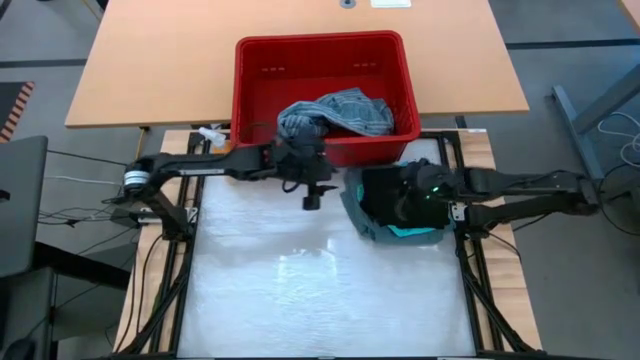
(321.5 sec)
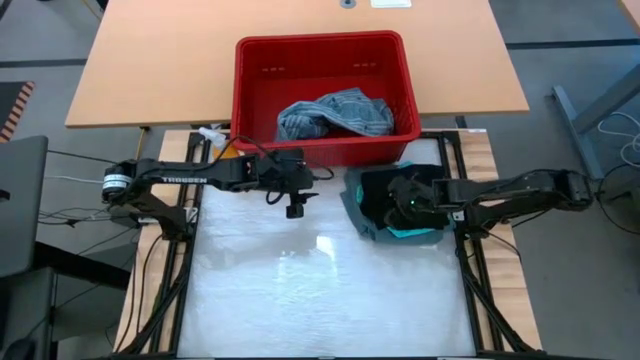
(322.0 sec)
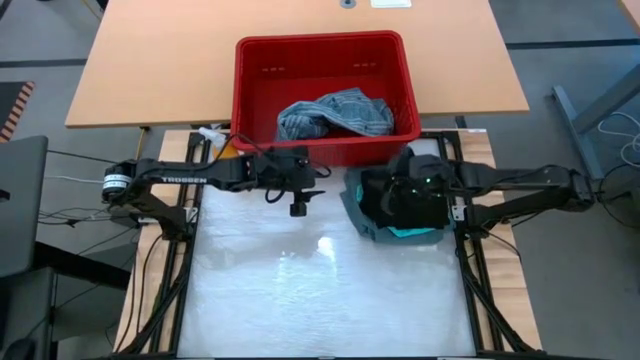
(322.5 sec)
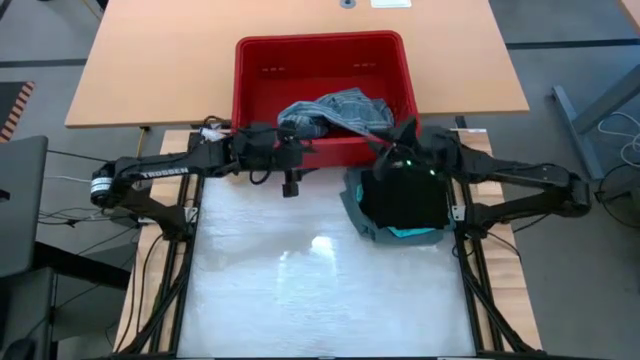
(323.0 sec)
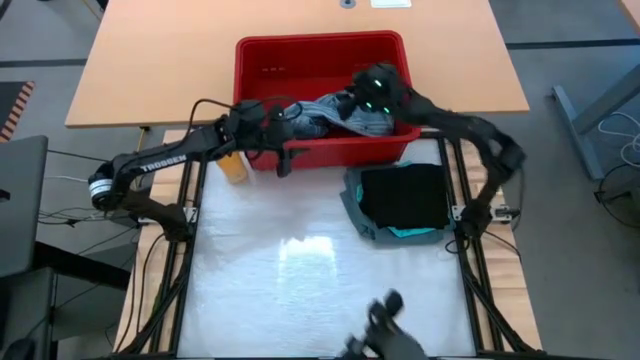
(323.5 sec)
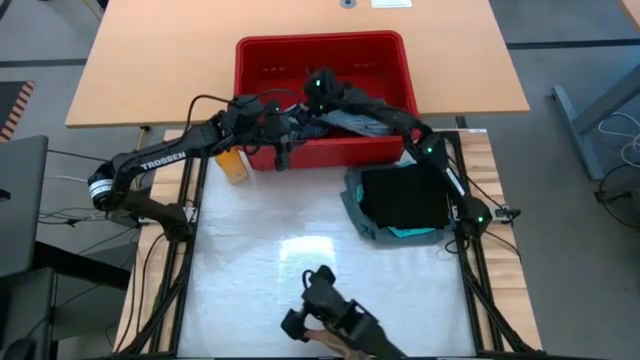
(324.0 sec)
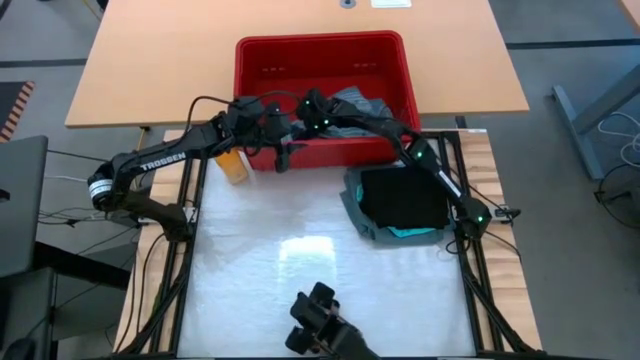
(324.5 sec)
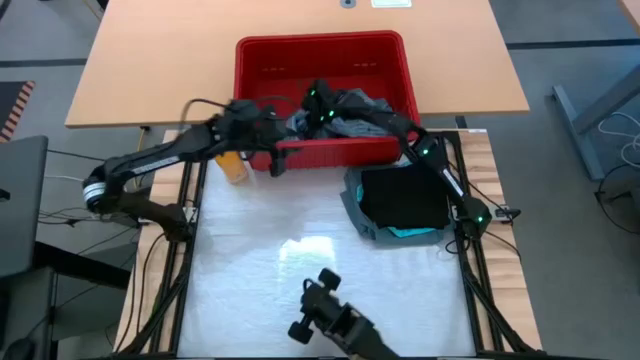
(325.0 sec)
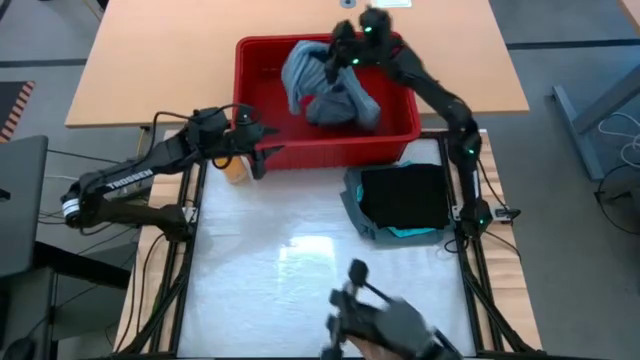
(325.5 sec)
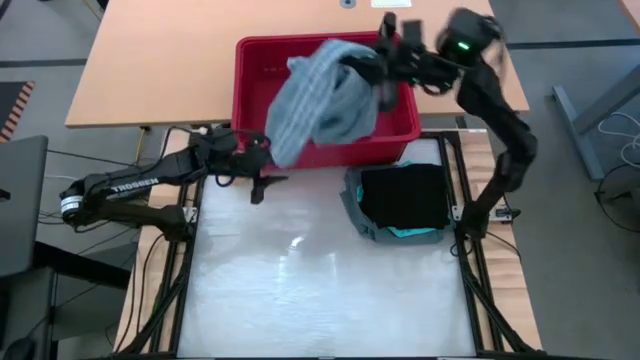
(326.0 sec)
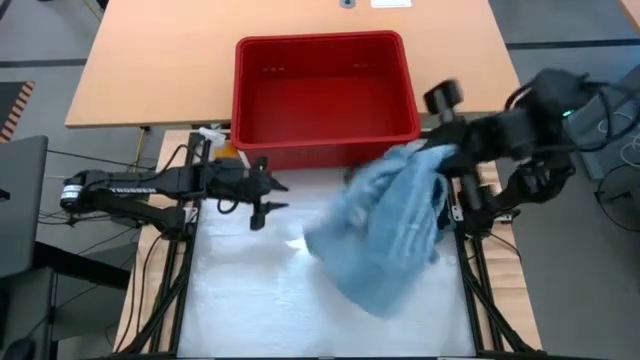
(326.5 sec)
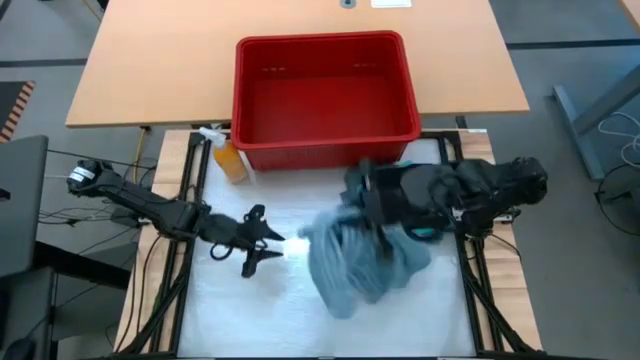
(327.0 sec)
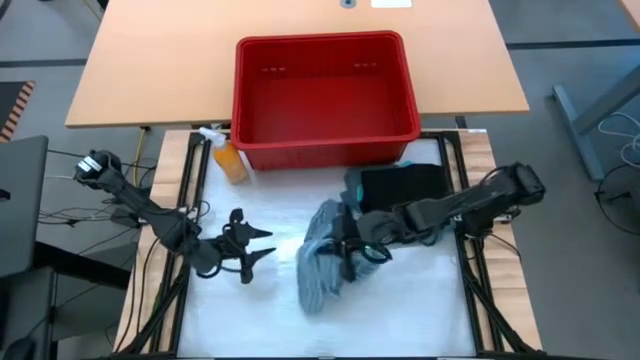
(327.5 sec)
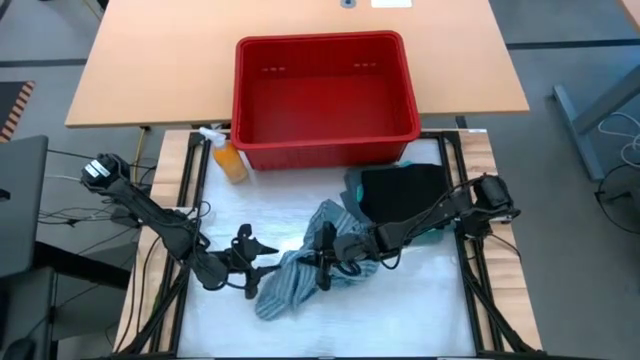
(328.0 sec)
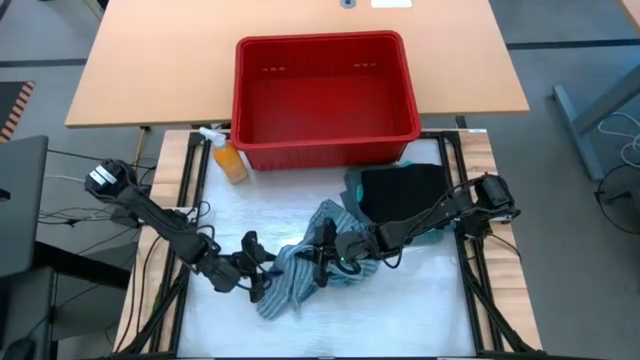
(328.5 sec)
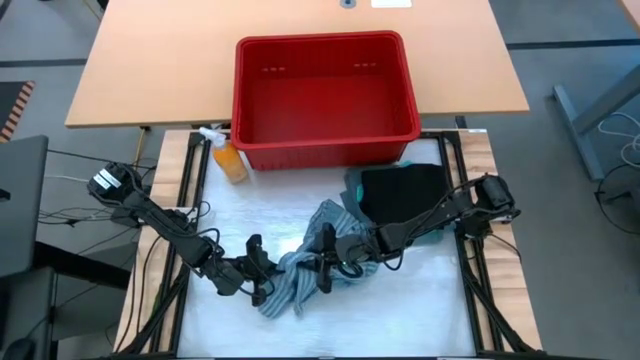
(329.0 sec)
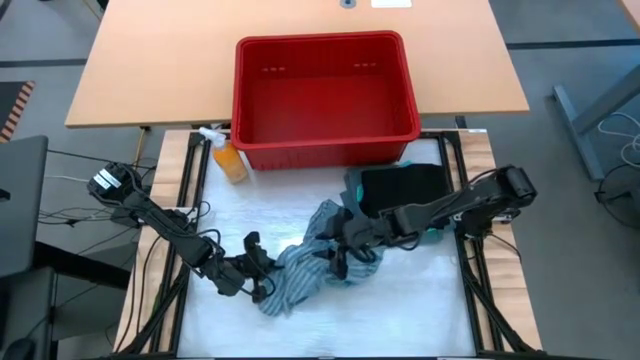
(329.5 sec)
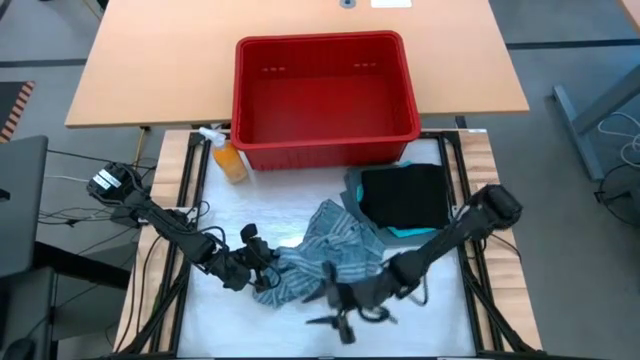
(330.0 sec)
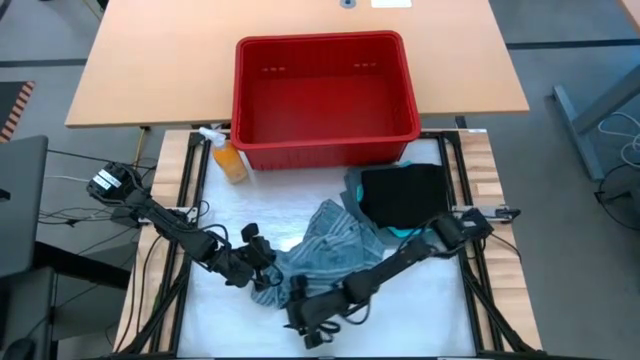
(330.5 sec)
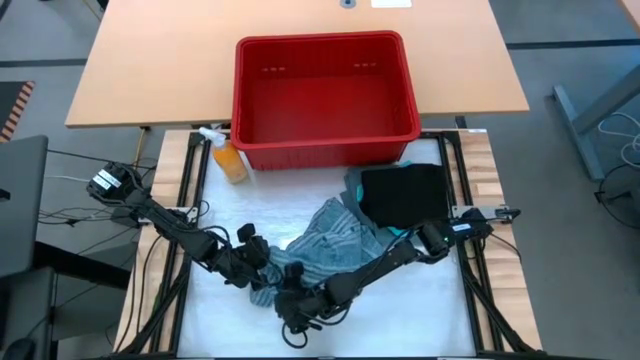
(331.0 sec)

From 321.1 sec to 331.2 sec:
Task: Fold Laundry from Bin
Remove the blue patterned polo from the red bin on the table

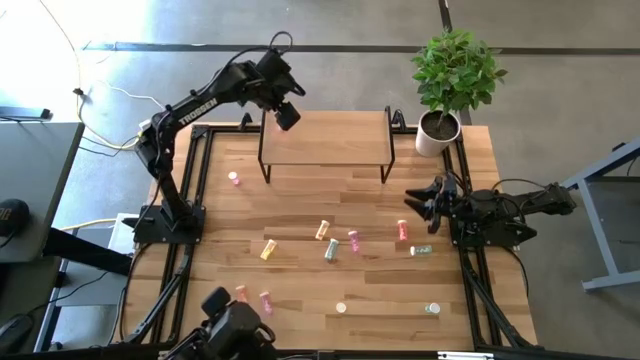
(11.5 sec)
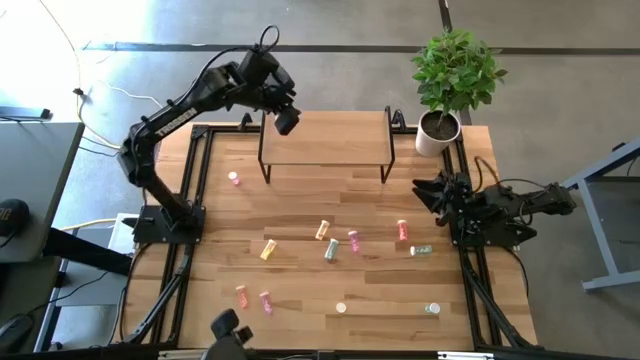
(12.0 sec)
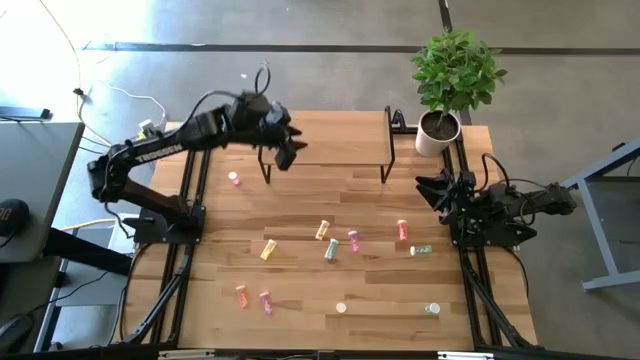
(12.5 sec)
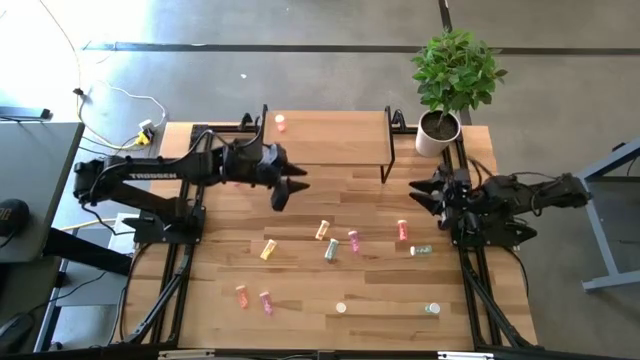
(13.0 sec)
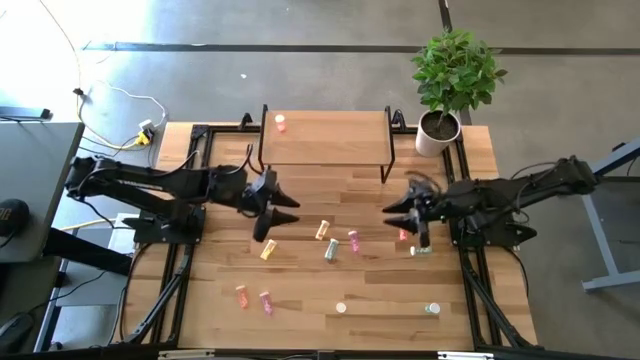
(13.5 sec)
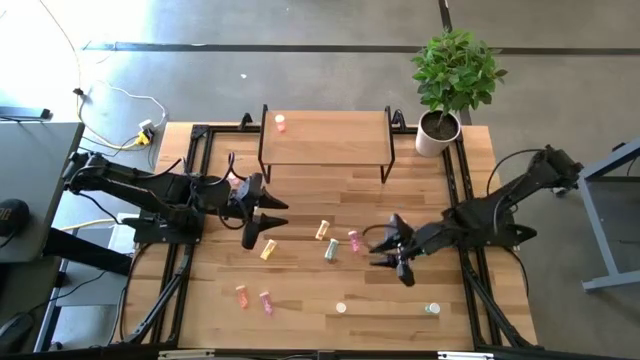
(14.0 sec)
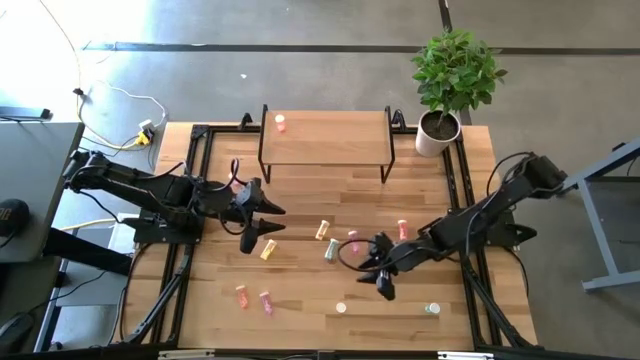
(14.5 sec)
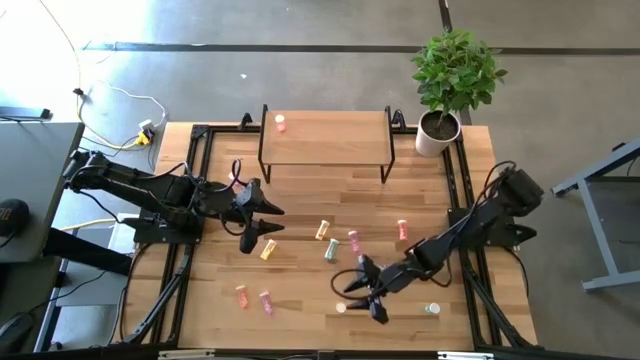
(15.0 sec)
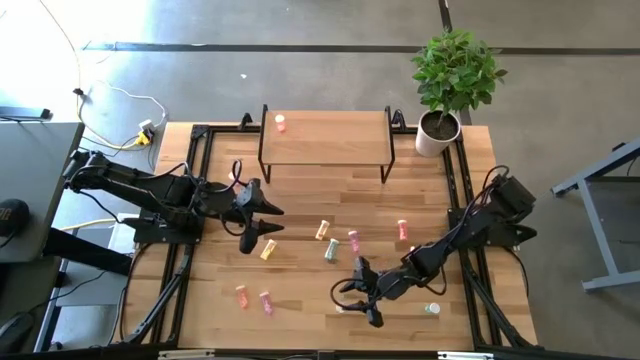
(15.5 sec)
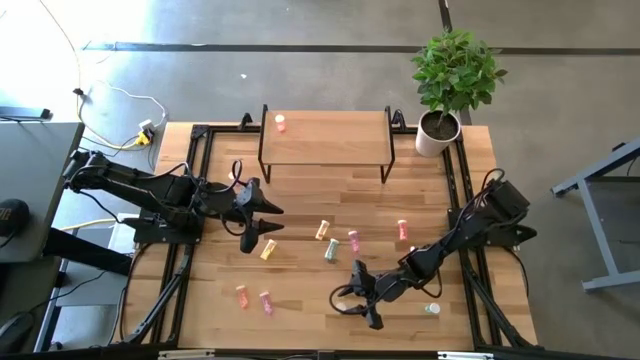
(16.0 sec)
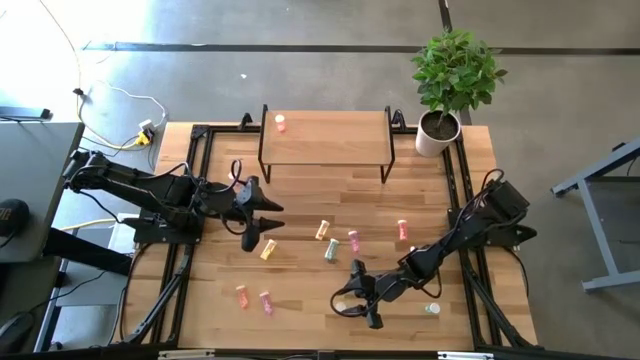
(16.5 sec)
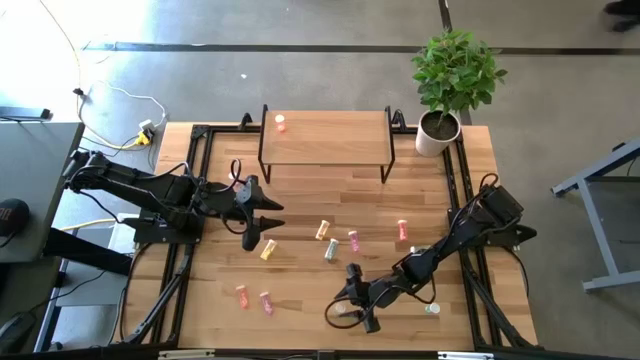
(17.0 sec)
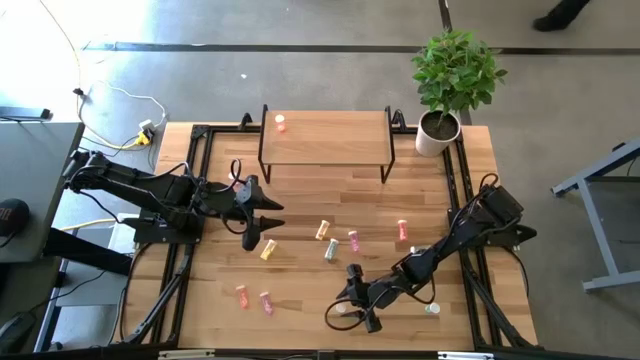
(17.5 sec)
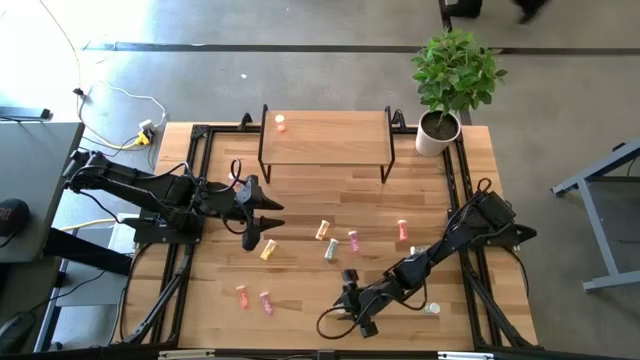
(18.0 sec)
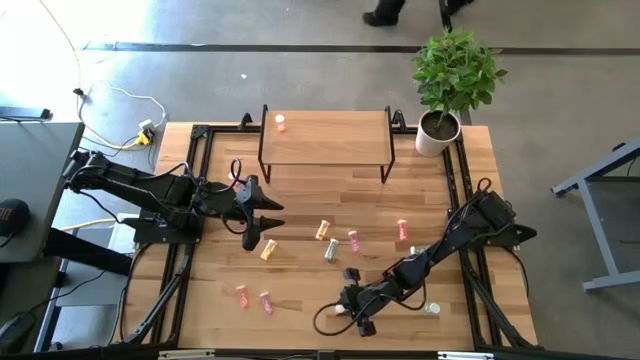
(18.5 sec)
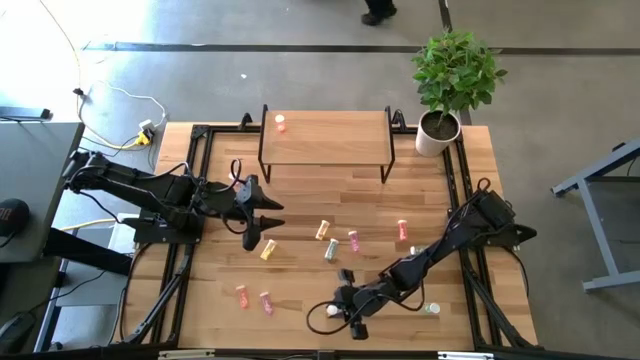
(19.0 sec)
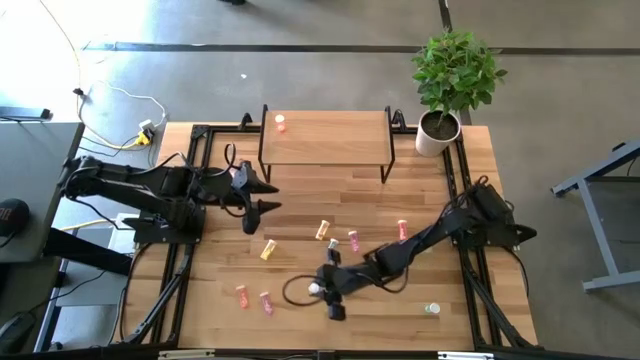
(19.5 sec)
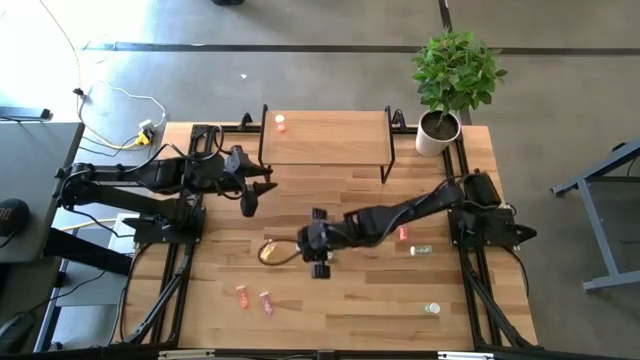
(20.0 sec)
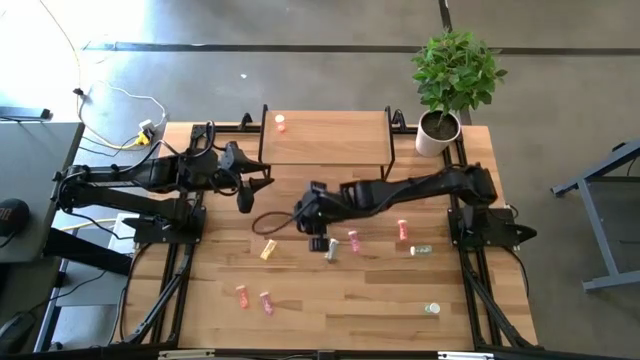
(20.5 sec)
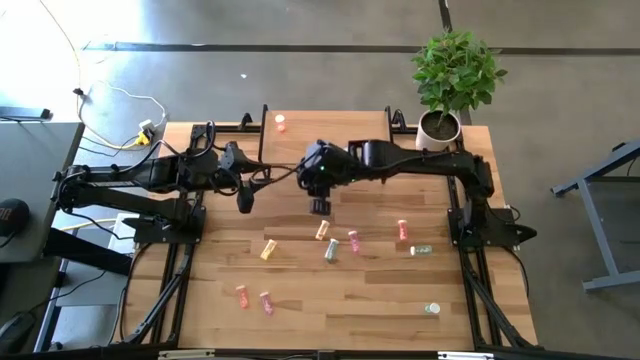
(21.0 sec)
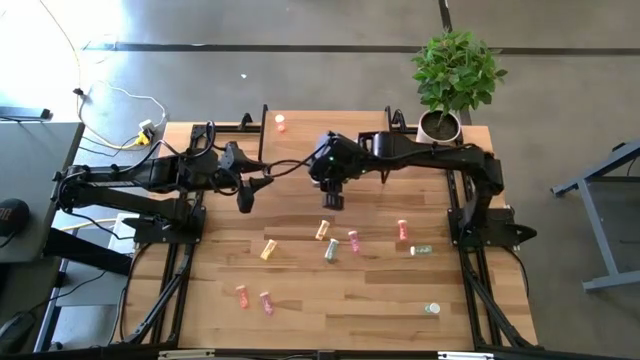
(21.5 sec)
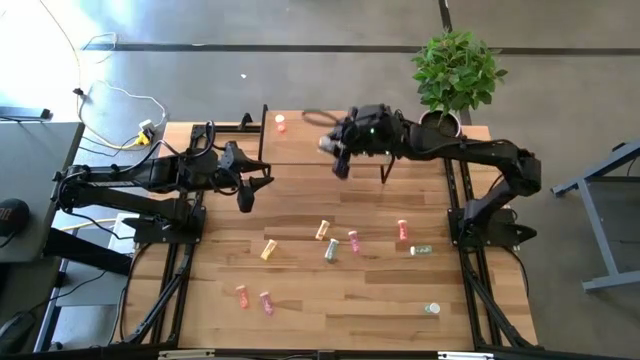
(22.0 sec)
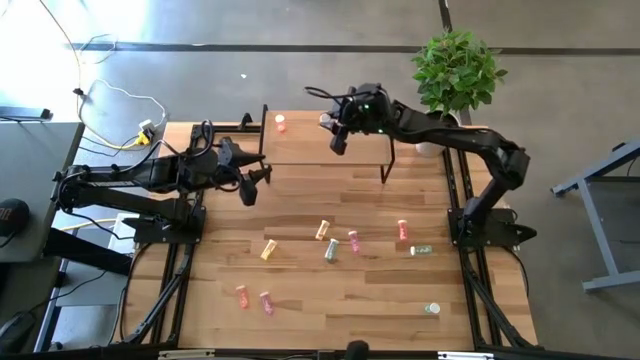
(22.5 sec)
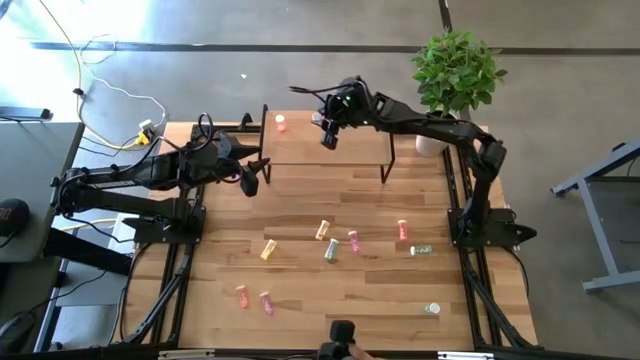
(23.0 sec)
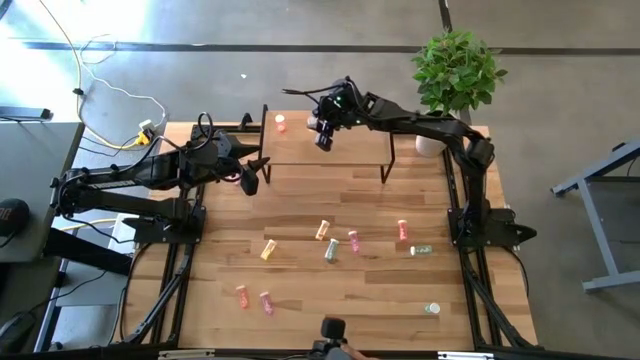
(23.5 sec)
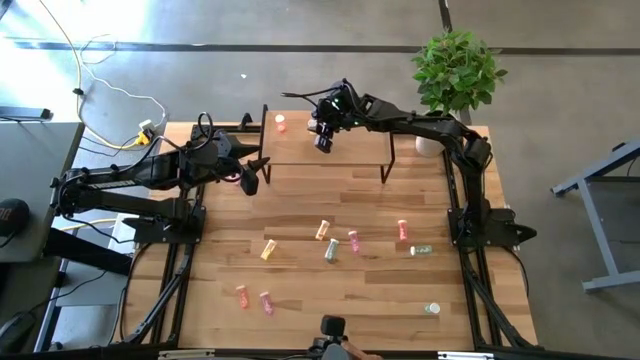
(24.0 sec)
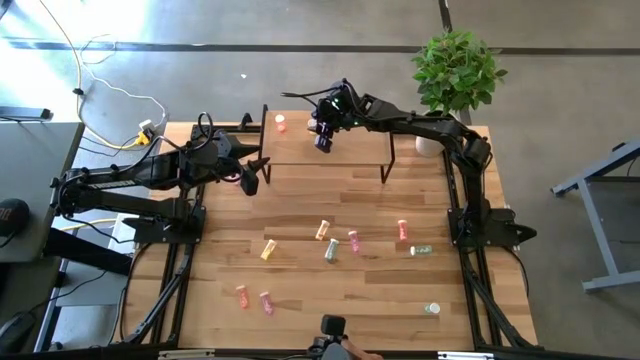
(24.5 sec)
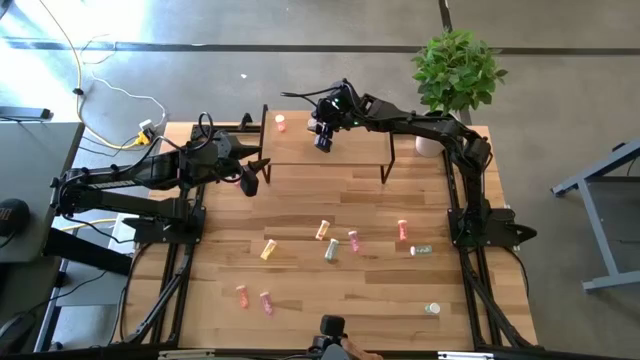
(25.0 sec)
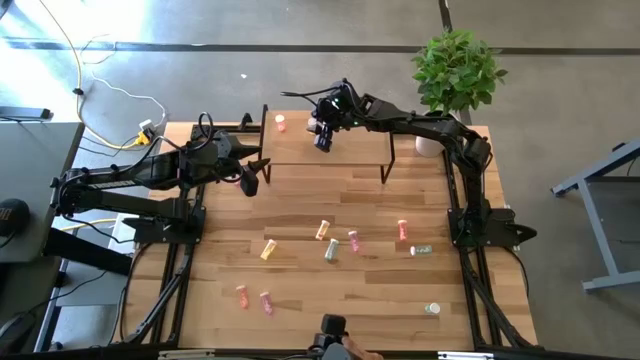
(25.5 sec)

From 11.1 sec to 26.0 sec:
Task: Pick and place medicine bottles onto shelf by color
Put the bottom yellow pill bottle on the shelf
